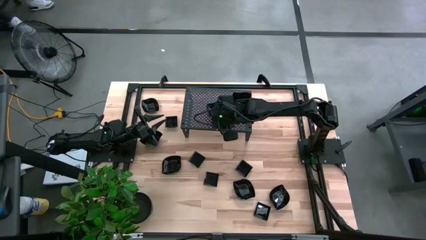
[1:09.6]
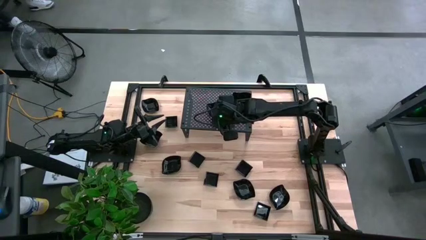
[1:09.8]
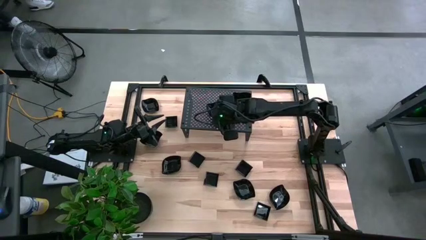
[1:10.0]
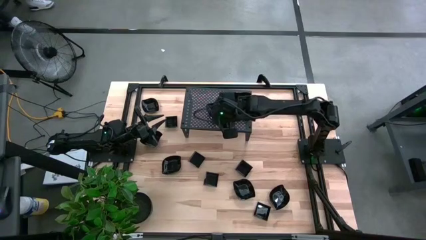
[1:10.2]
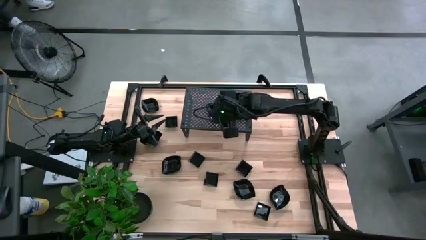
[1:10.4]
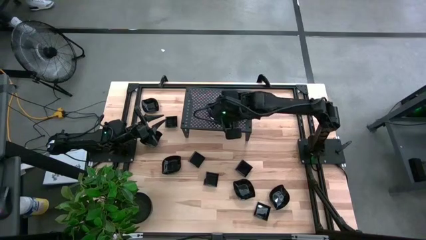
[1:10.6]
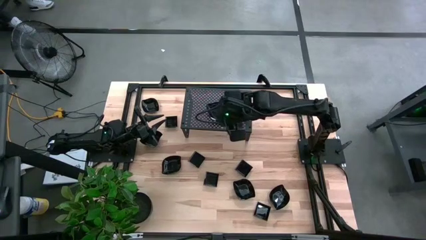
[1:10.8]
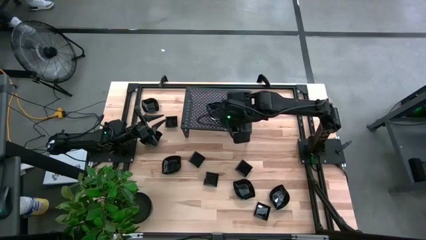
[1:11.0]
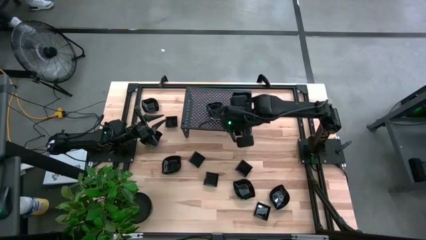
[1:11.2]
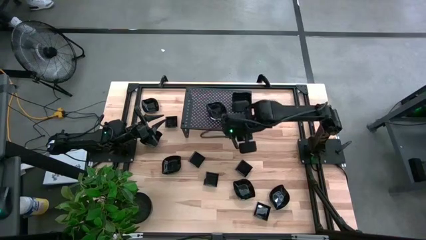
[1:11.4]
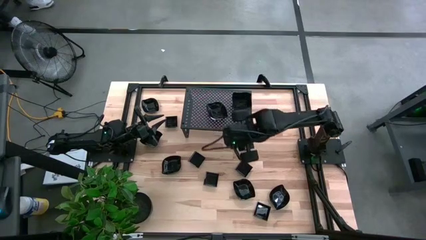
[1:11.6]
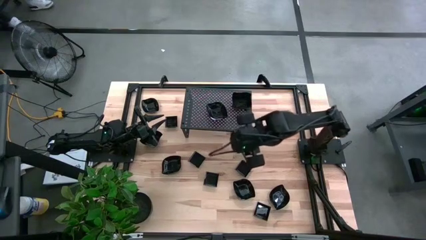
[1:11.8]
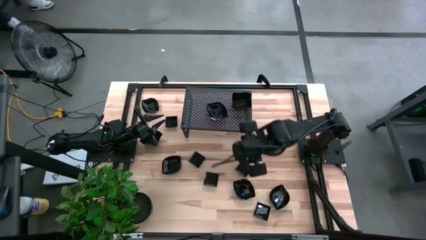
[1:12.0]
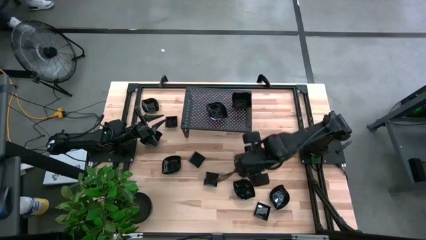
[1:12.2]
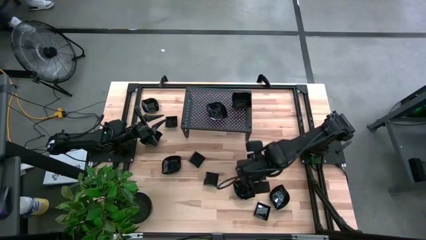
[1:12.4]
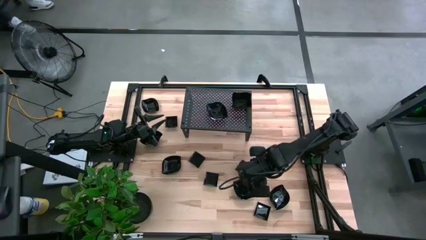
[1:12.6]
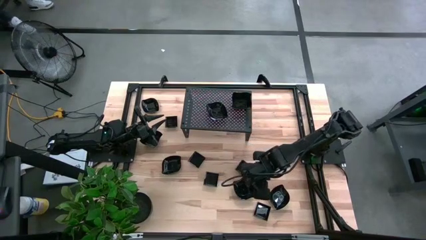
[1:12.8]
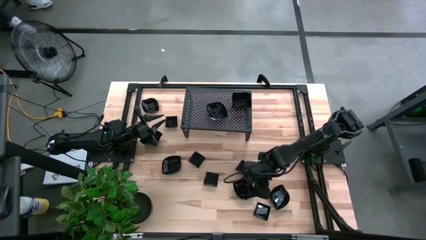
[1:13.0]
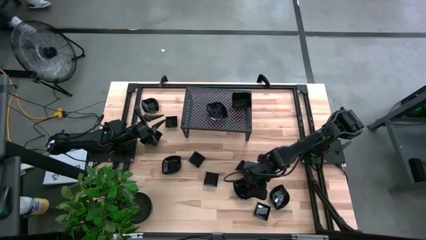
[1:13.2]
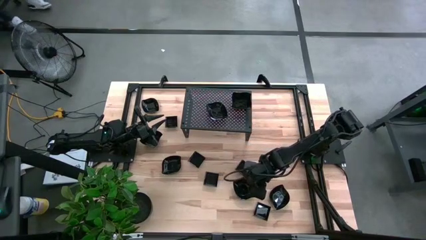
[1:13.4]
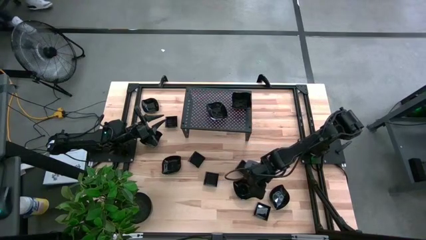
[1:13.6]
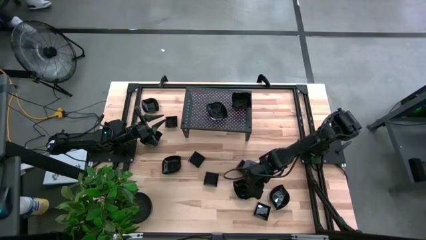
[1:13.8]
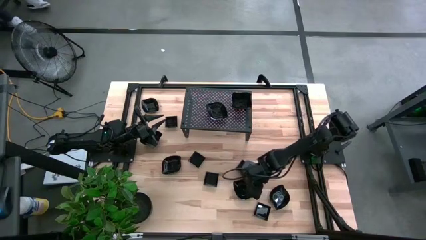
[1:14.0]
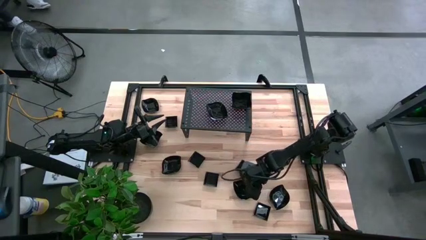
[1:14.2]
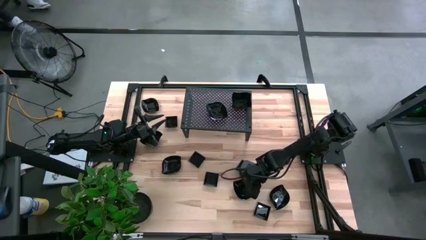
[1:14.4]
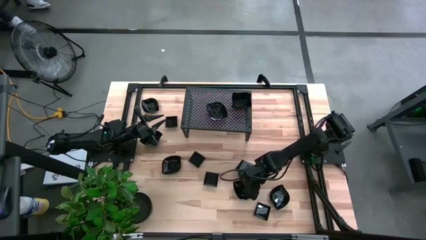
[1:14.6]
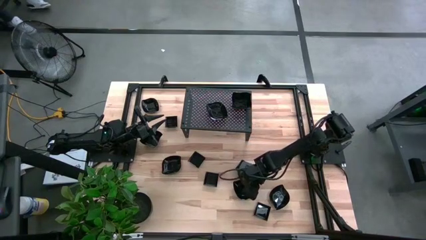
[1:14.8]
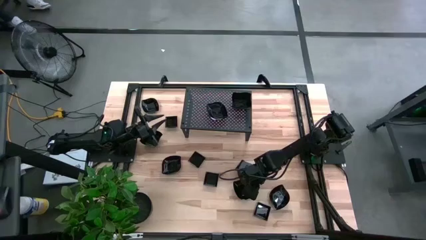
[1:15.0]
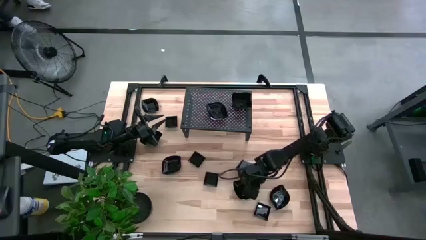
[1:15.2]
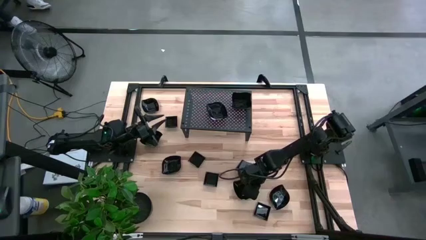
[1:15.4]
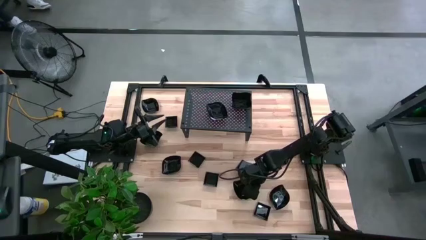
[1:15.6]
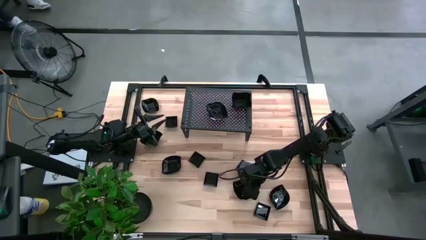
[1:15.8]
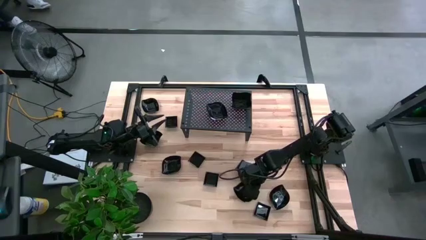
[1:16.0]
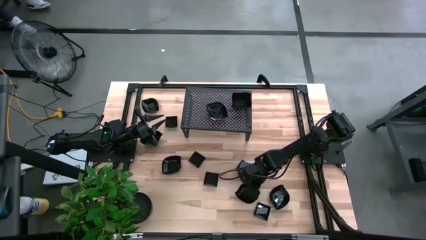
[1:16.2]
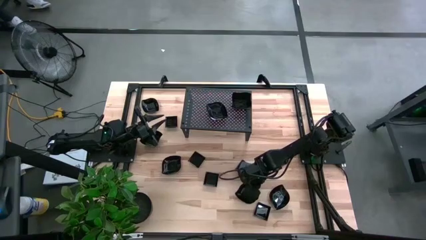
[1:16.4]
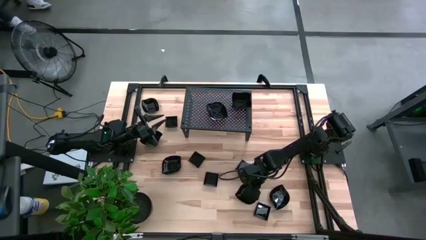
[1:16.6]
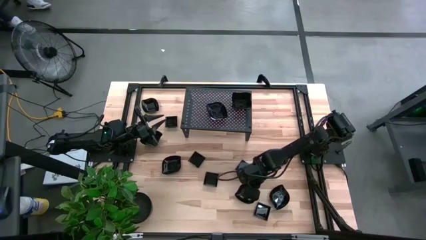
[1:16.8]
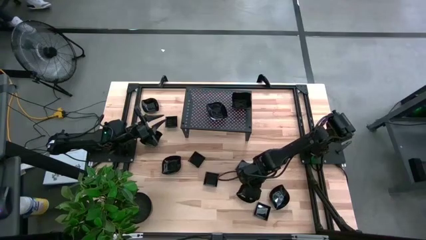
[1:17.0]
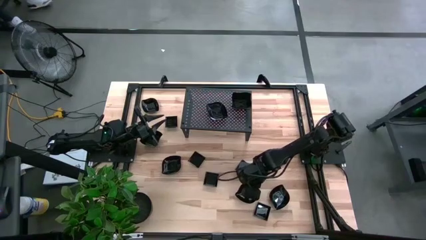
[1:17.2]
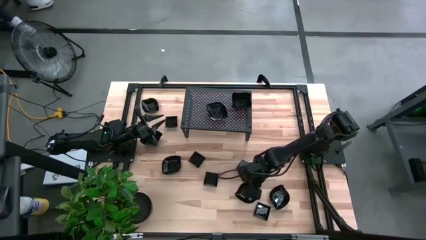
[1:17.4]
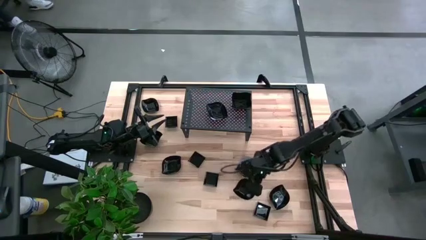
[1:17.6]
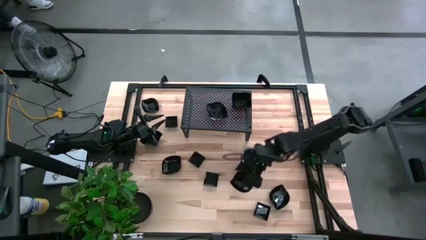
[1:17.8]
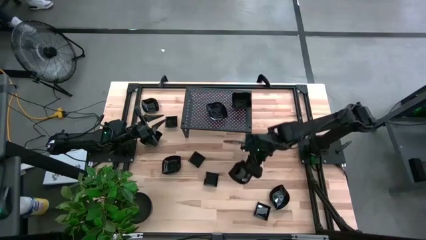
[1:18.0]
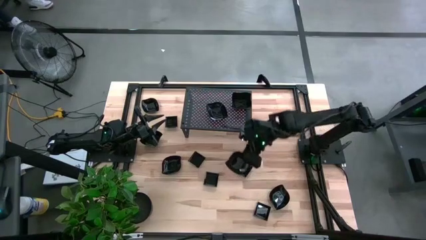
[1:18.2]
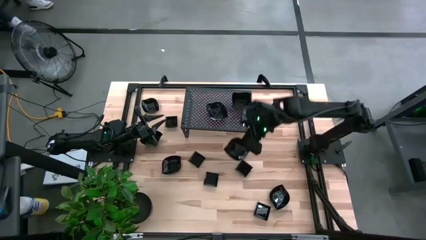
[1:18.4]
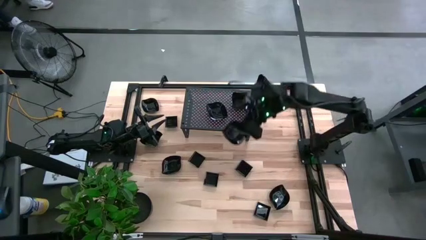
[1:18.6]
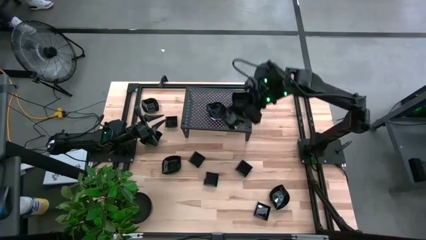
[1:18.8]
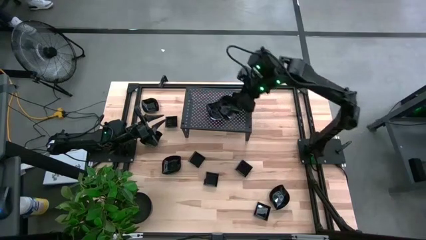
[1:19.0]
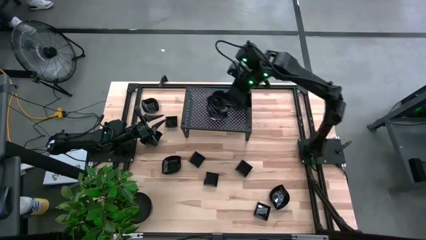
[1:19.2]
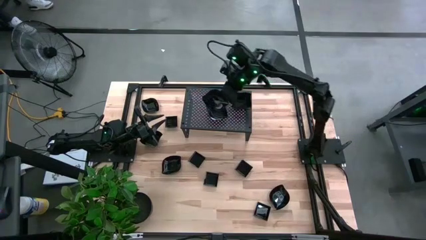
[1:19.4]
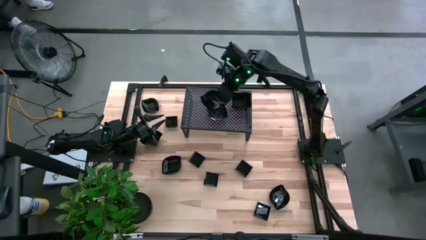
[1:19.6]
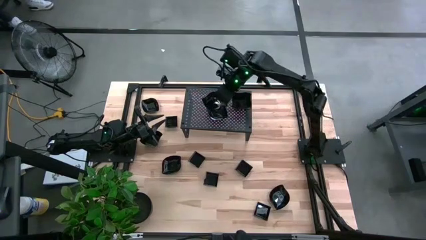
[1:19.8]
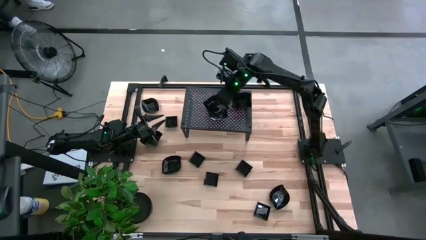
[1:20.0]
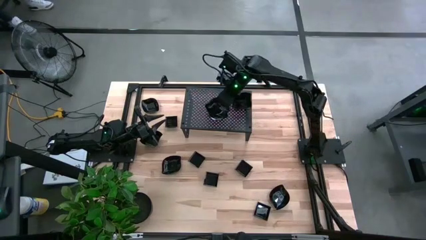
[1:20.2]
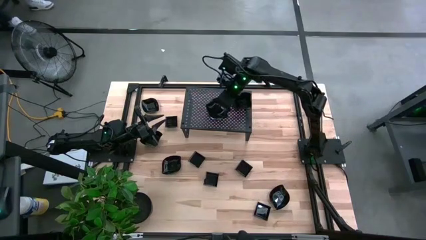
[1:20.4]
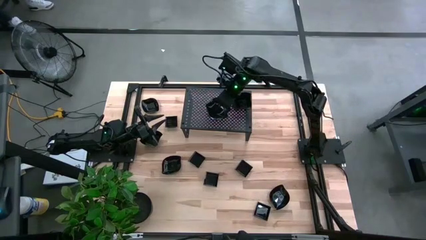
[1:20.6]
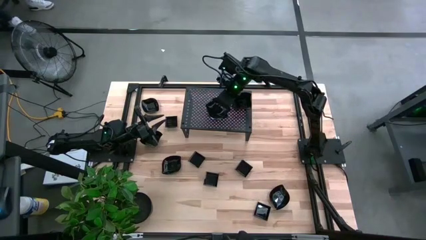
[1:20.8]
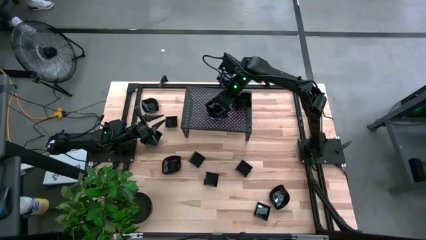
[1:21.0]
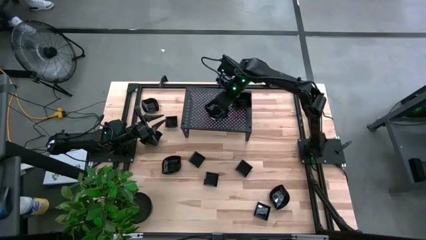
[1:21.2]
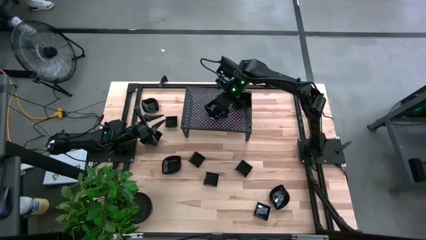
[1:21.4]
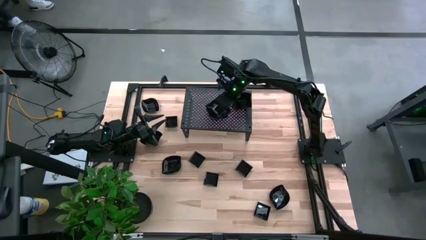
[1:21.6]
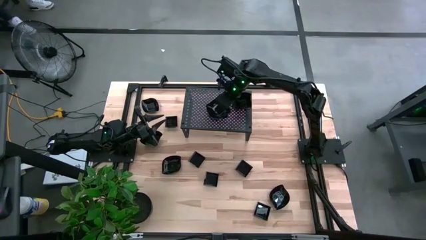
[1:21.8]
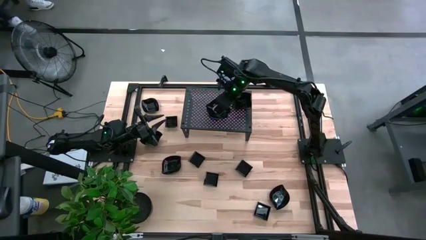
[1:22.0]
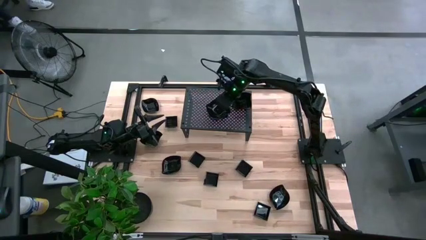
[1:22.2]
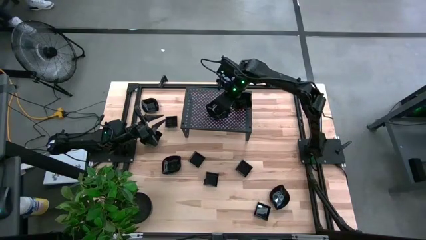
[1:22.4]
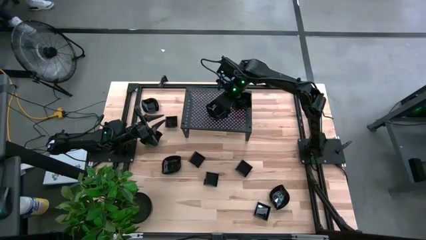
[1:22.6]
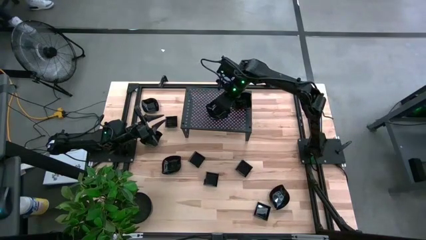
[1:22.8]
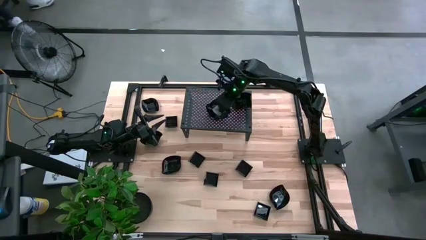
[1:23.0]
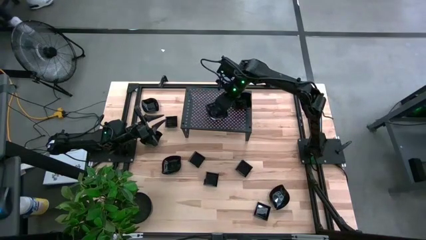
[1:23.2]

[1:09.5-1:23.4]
Task: Pick & Place Mini shaped plates
Stack the leaf-shaped plate on the leaf-shaped plate on the shelf
